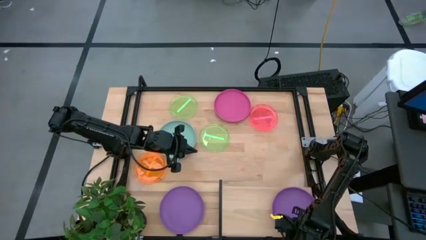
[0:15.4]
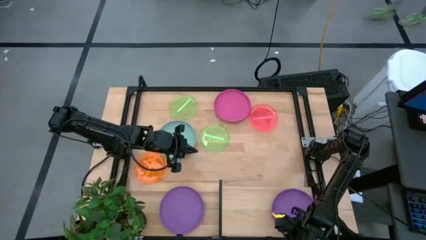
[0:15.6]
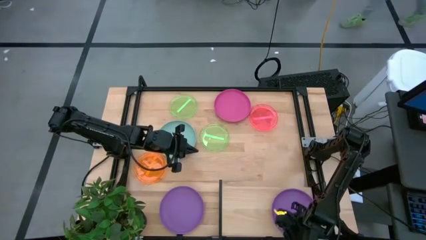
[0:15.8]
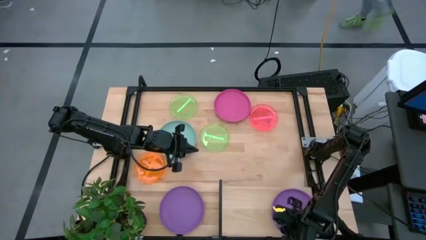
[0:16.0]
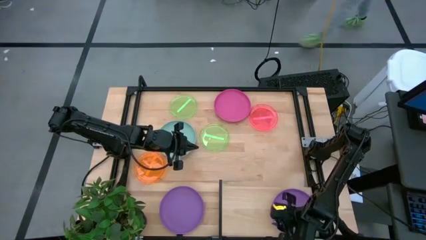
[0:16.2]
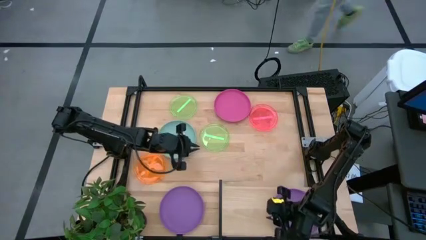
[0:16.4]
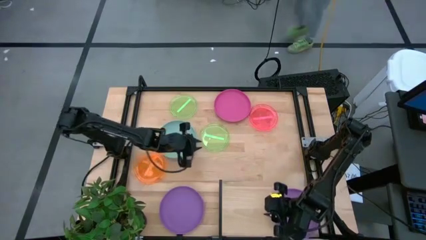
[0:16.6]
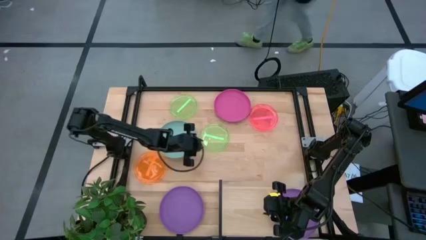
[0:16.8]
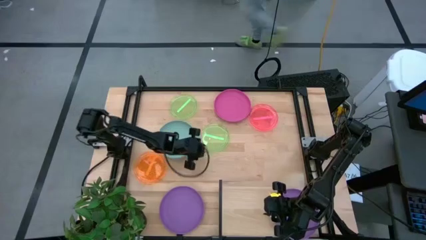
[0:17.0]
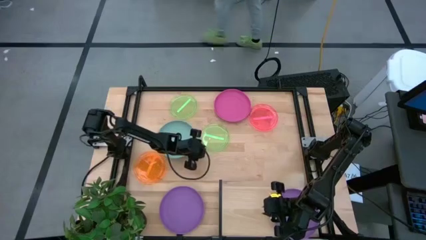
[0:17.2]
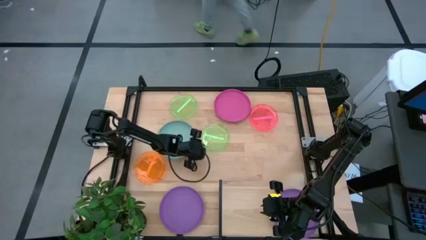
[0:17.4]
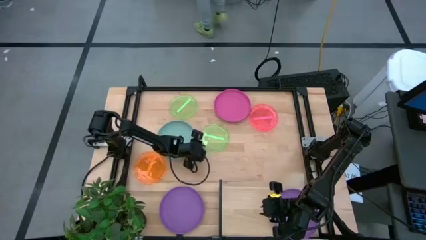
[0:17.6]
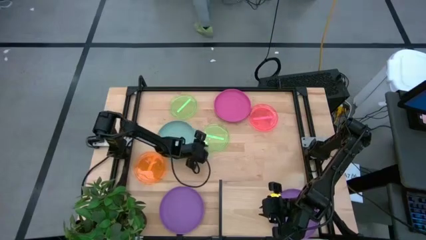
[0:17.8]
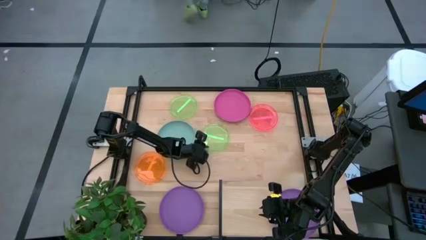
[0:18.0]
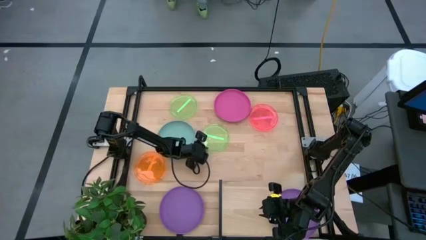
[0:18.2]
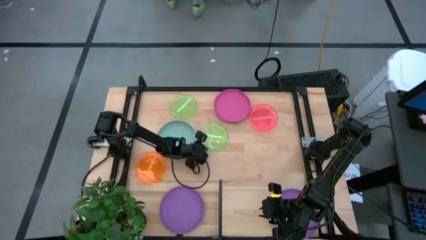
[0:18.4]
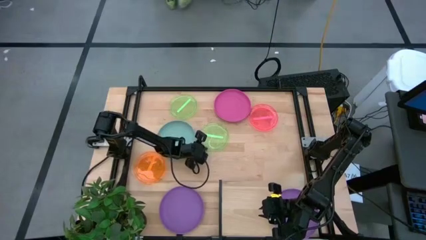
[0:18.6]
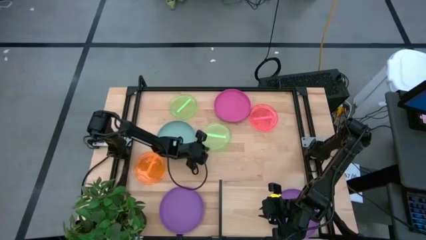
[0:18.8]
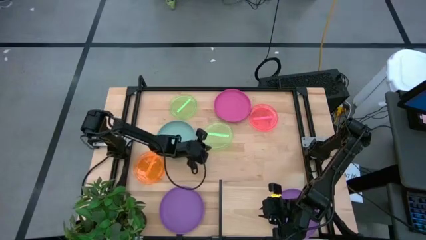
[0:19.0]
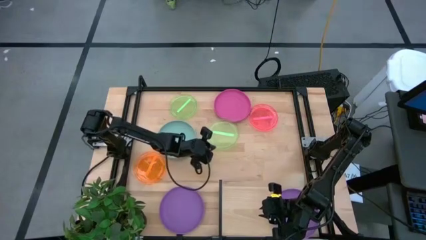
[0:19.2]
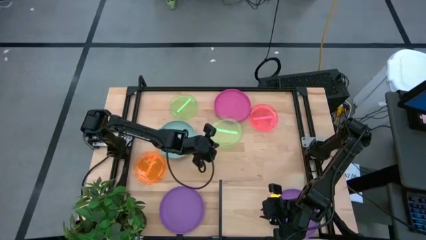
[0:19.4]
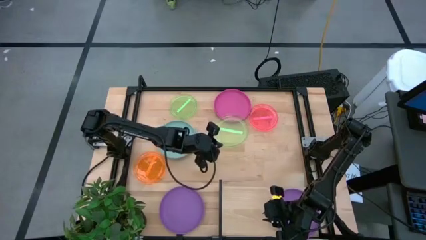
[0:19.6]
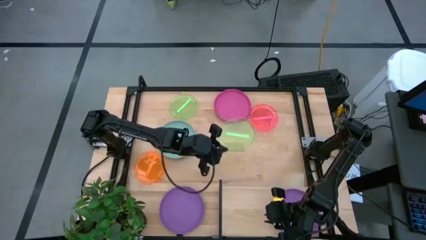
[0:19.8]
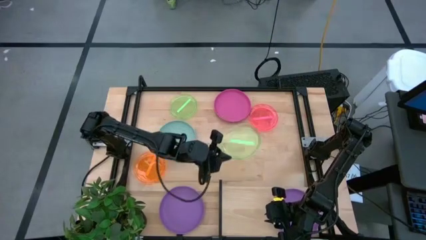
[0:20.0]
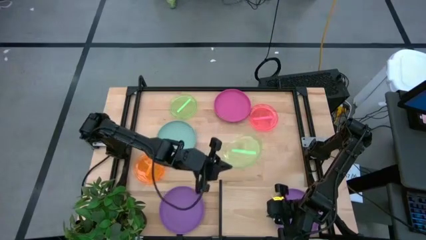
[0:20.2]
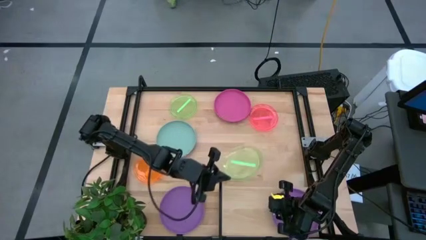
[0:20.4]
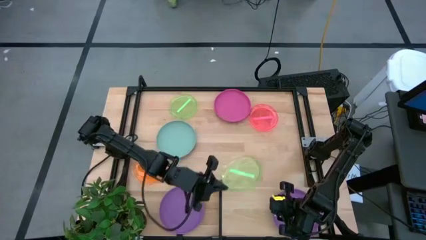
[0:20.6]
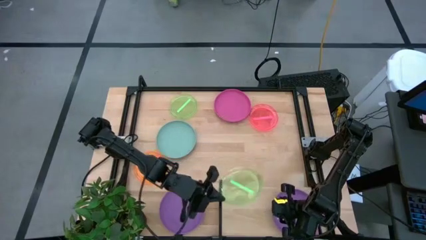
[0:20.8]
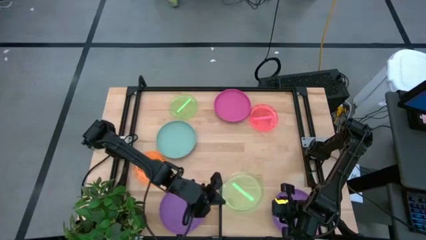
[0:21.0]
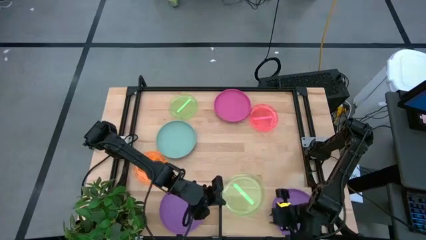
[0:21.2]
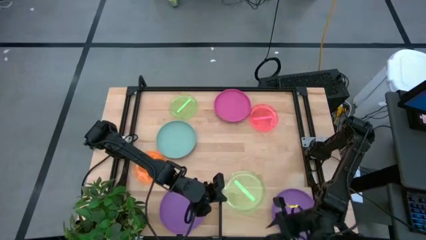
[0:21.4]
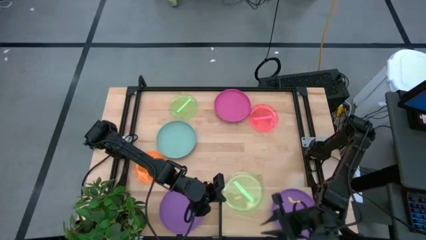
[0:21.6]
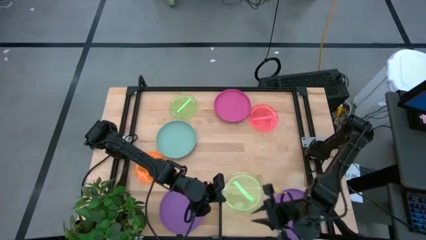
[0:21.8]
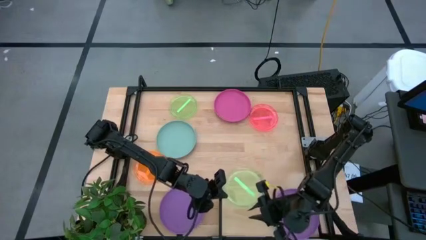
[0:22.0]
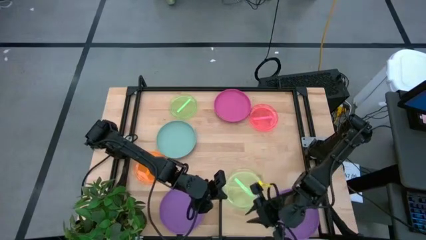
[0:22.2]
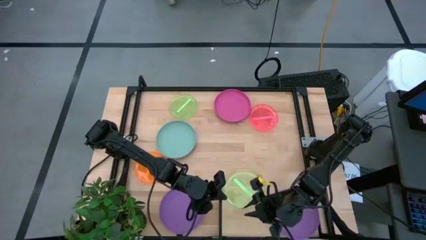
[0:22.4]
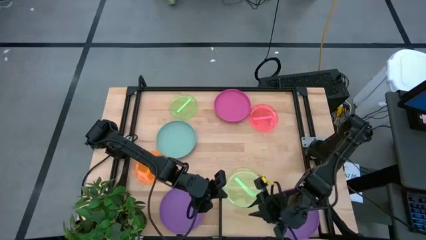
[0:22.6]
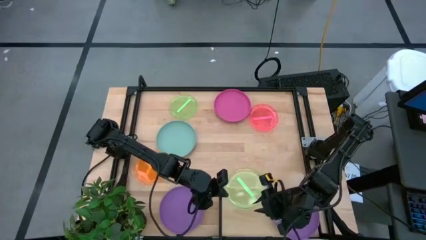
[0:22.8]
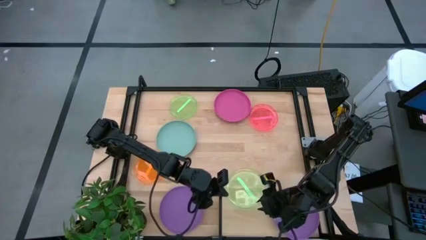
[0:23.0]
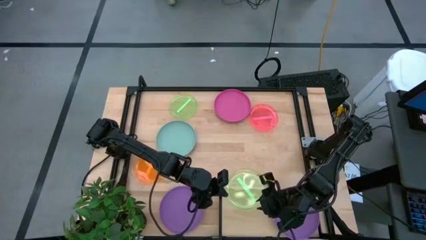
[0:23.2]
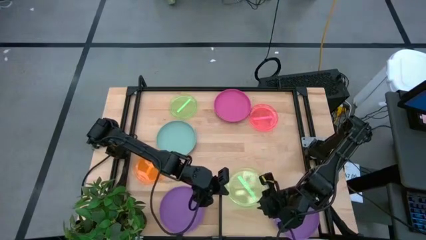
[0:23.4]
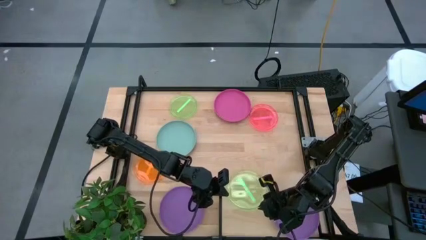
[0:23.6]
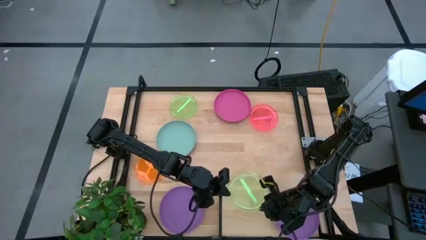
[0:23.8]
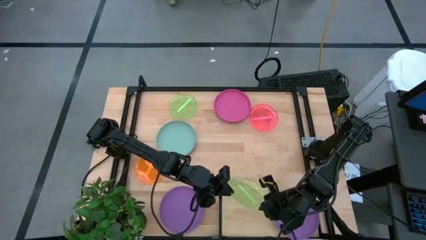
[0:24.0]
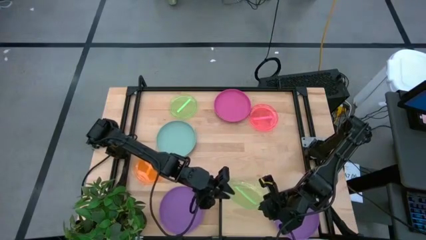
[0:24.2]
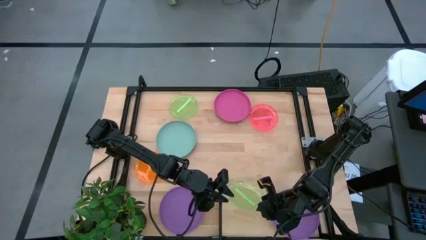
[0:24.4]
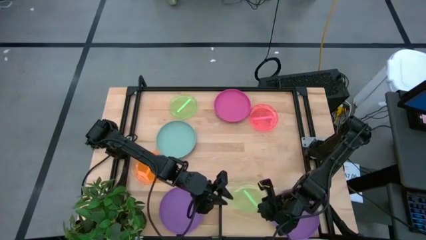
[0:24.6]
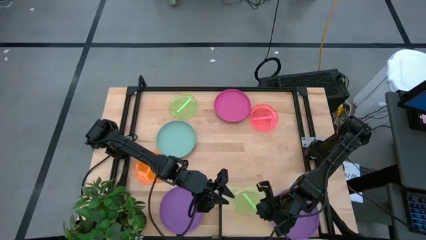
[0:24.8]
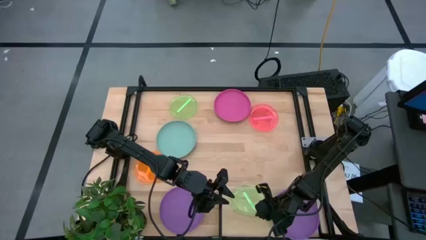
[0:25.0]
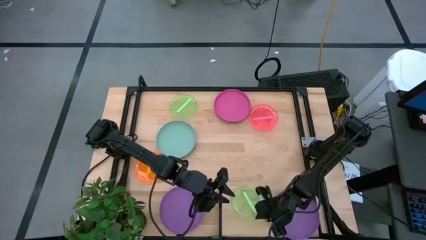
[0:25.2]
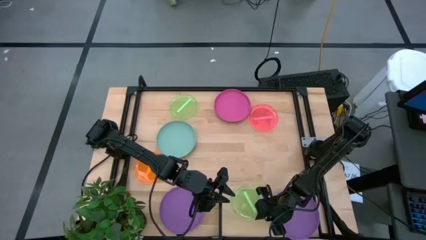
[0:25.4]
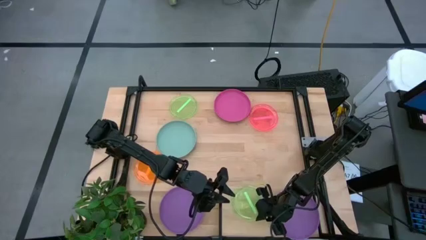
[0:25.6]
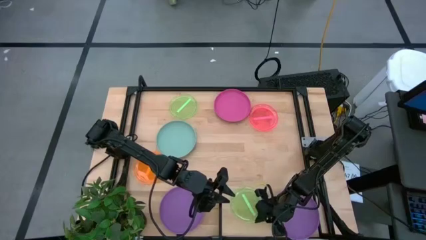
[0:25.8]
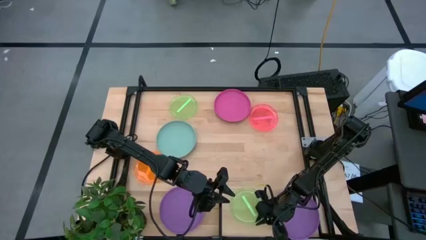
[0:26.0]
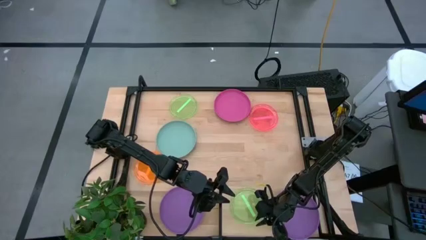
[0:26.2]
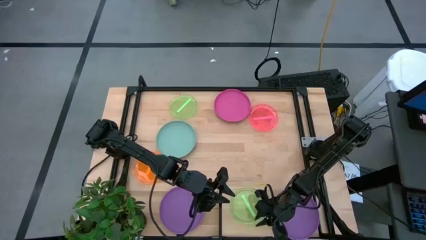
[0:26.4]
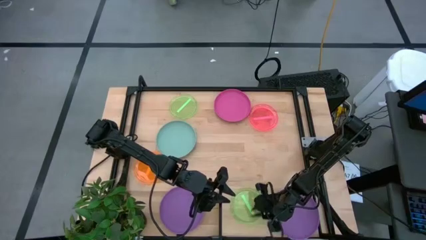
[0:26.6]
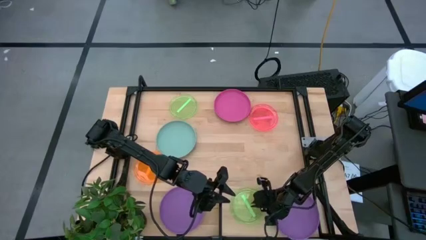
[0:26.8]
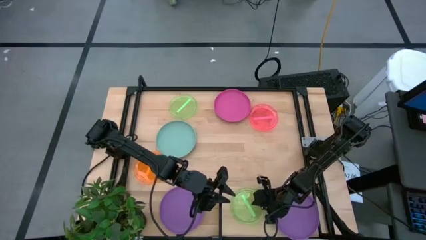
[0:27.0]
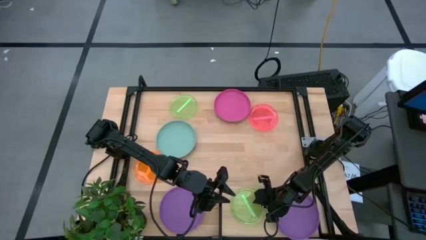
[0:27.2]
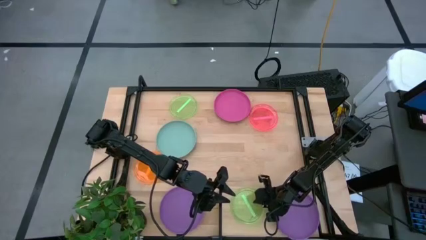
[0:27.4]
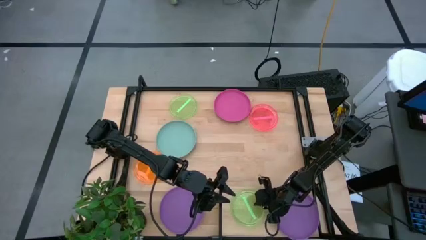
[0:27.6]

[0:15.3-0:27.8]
Task: Place and stack plates onto a shelf
Put the right green plate on the shelf
